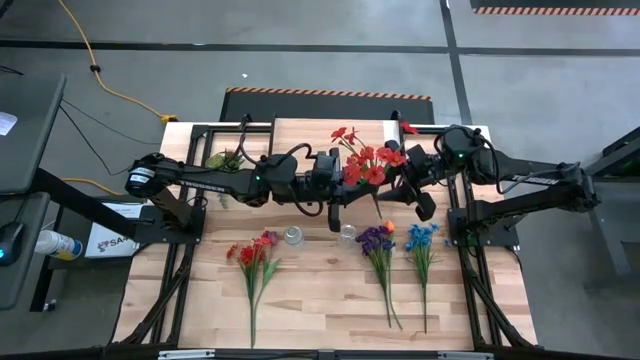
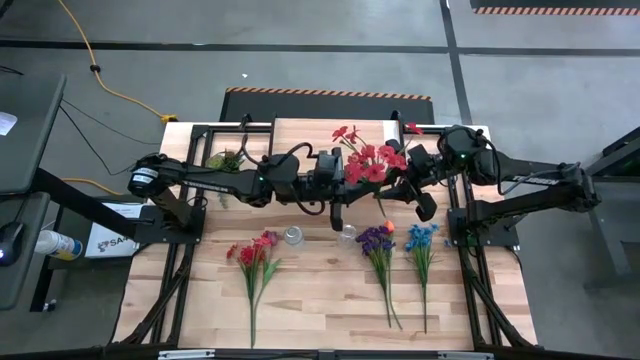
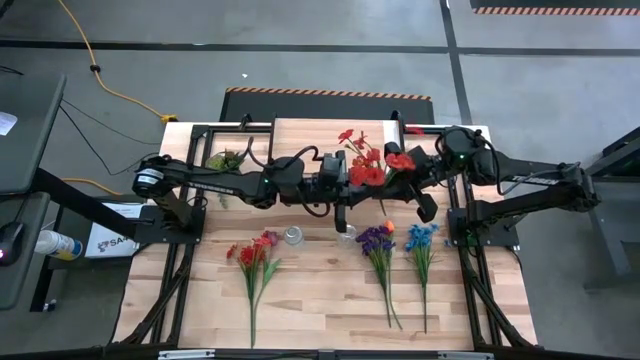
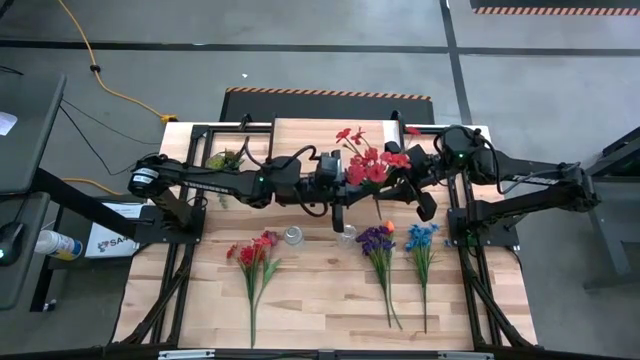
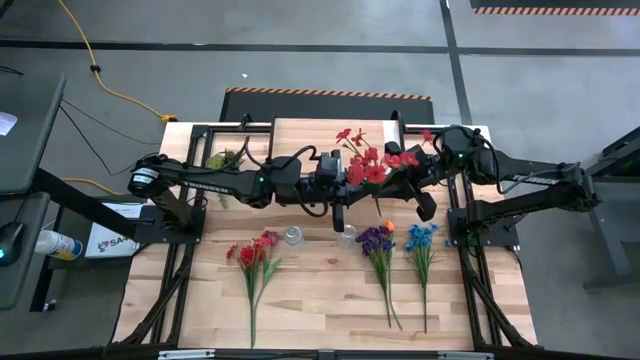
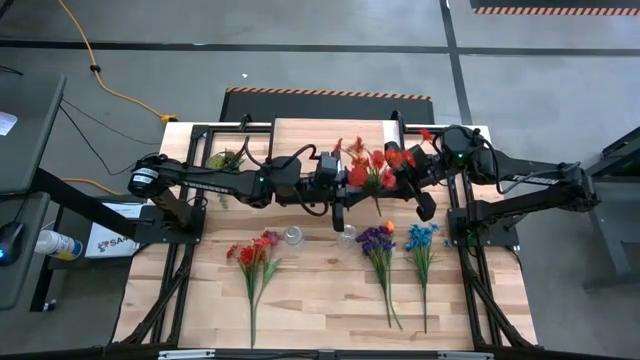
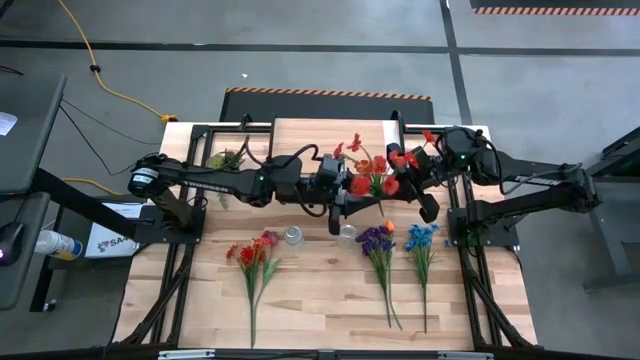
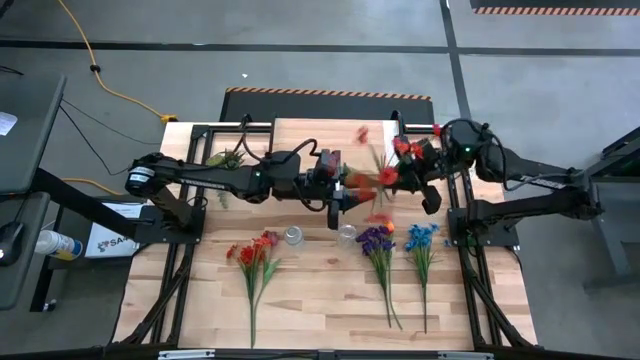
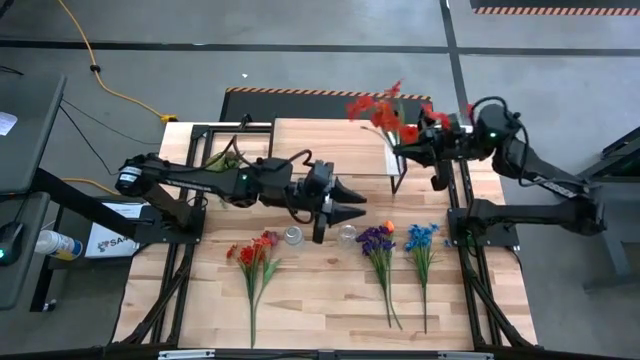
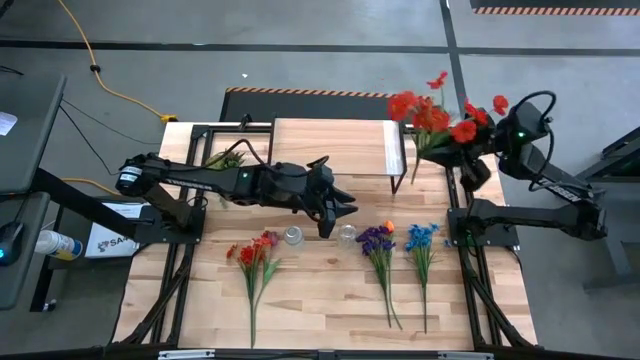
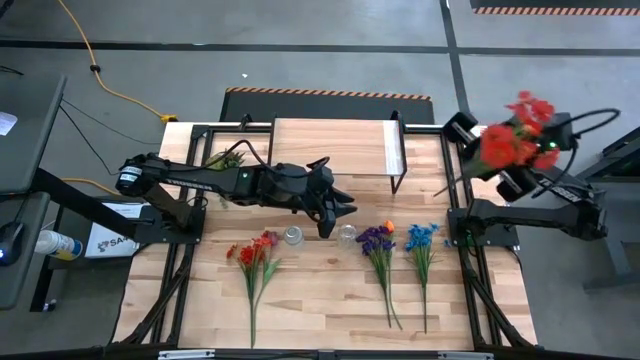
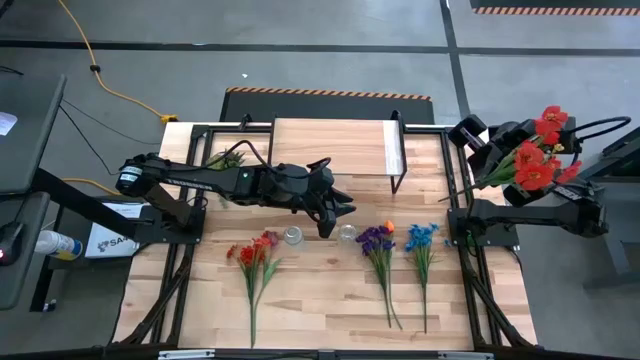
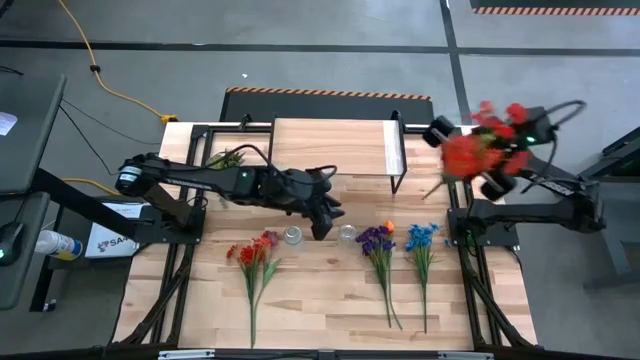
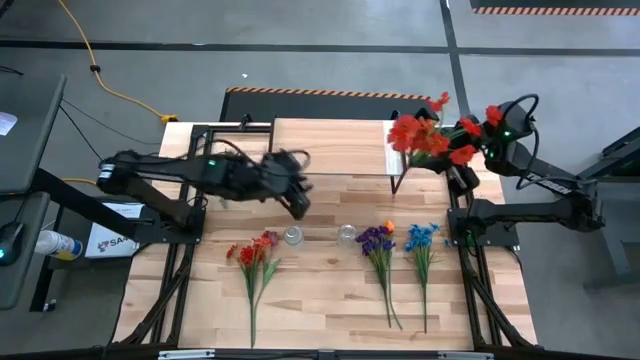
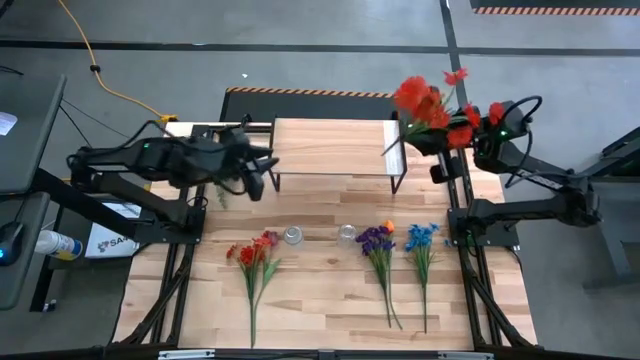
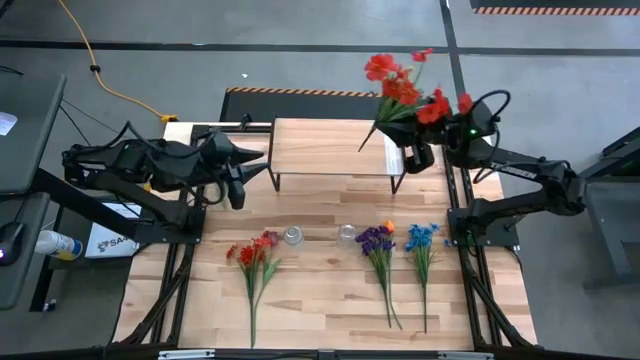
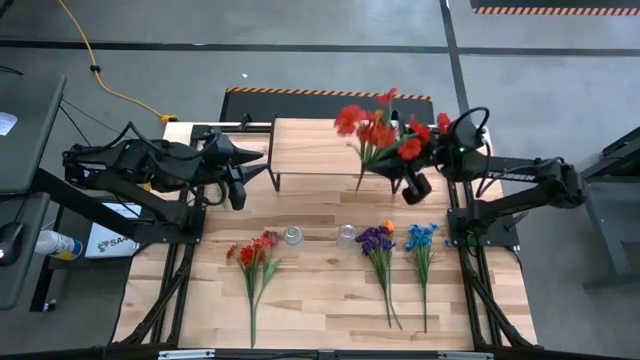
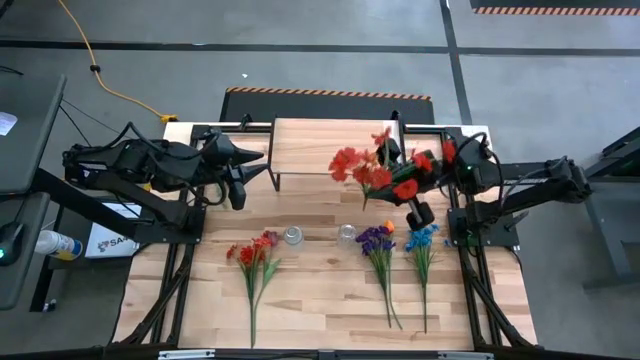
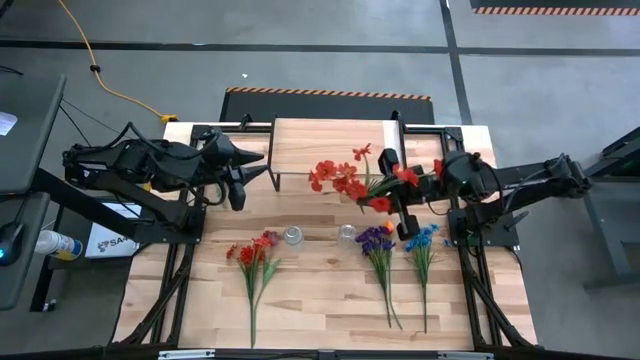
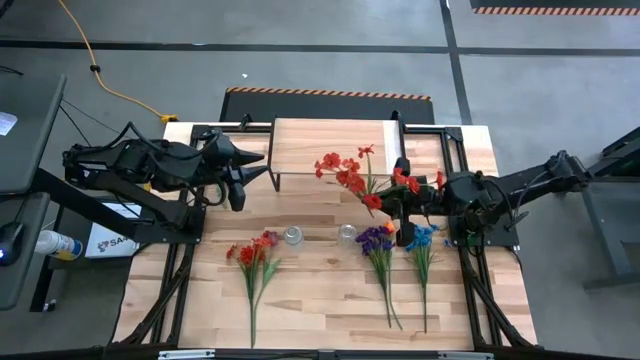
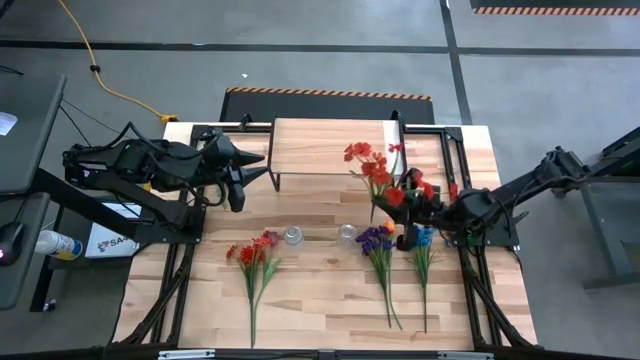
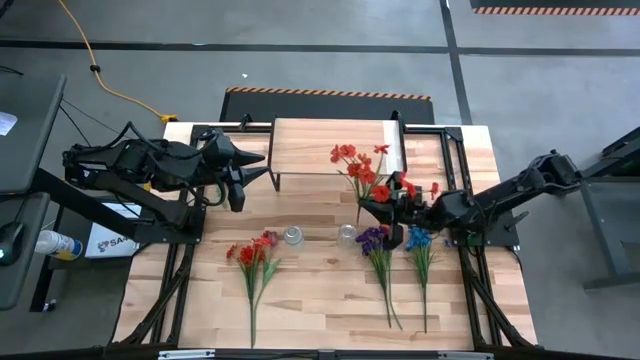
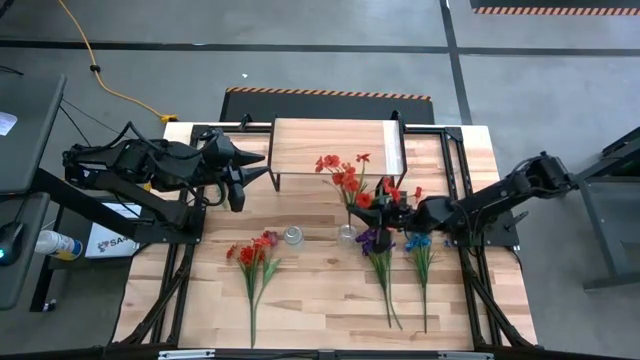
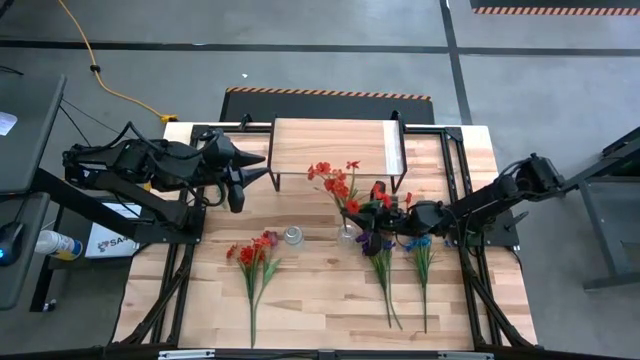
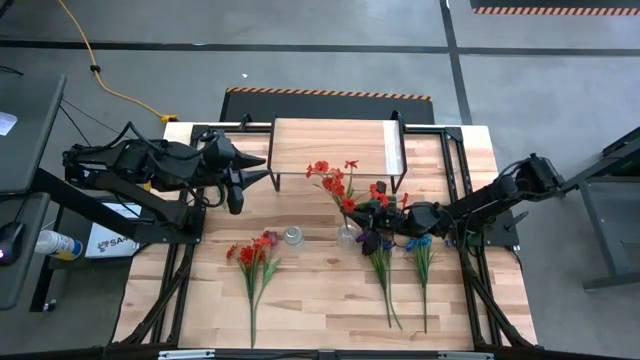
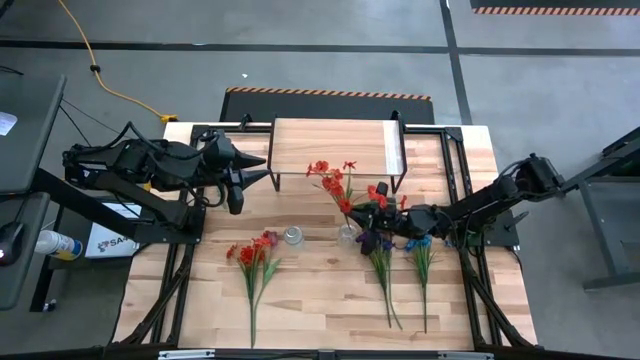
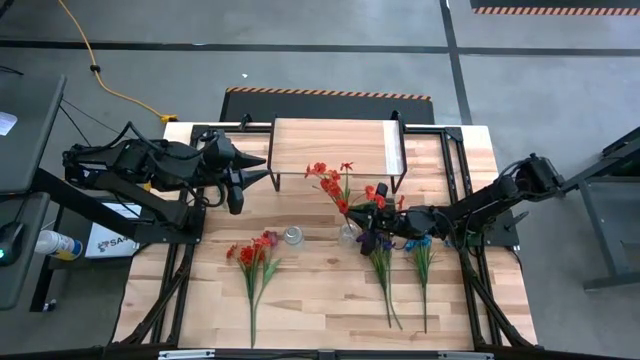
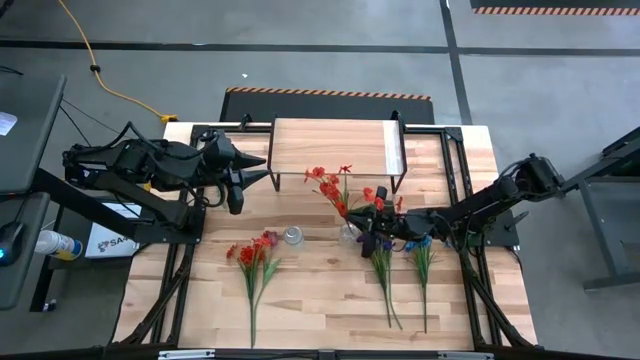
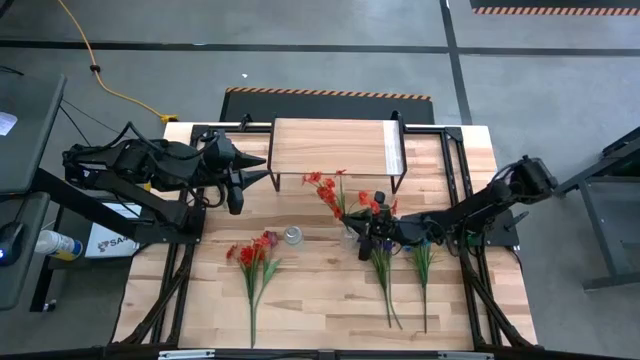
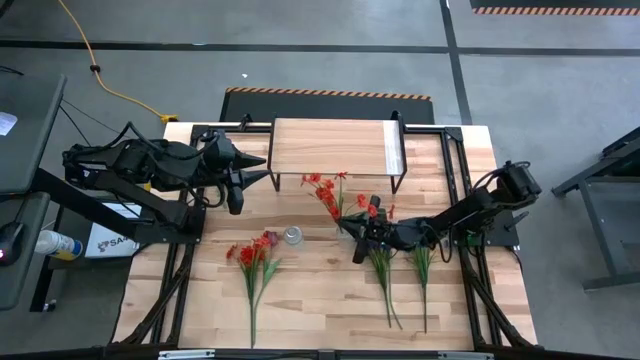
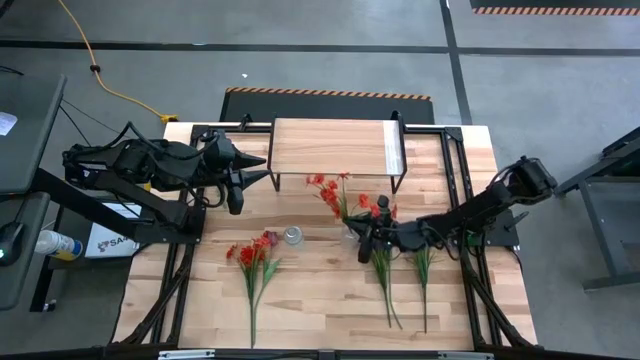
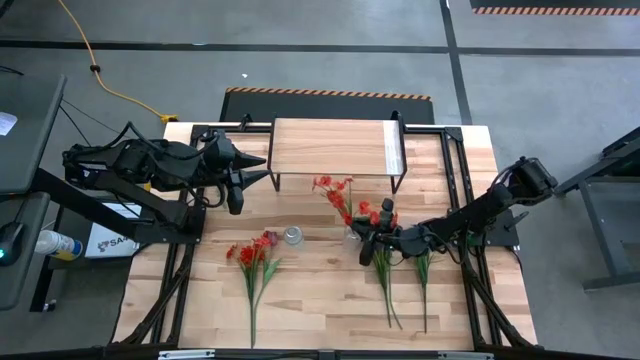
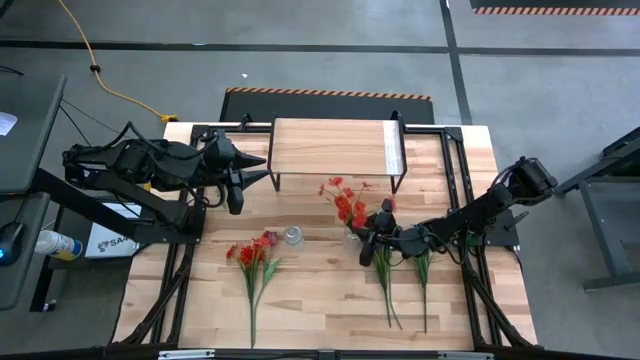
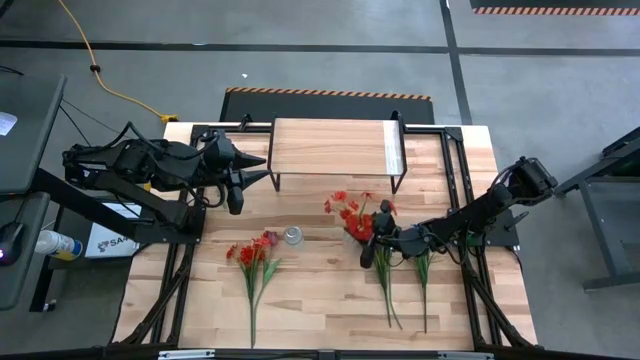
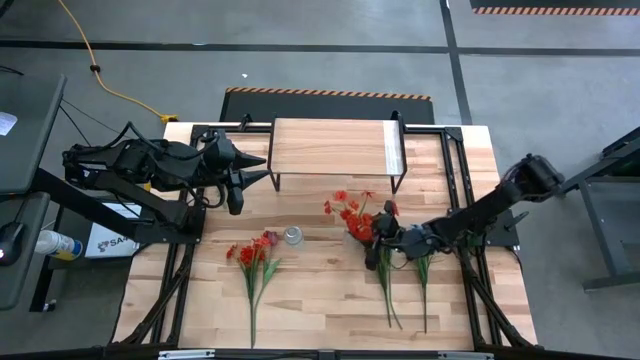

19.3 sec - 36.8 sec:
Task: Pick and place flowers into a vace then onto a shelf
Put the left orange flowers into the right transparent vase
